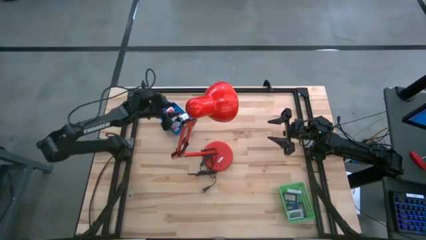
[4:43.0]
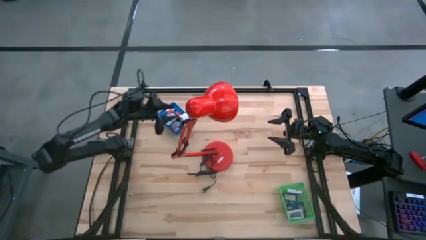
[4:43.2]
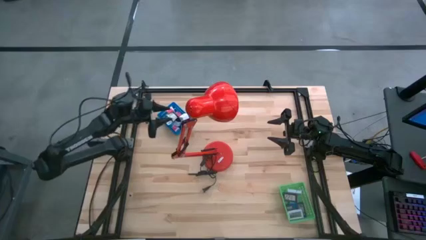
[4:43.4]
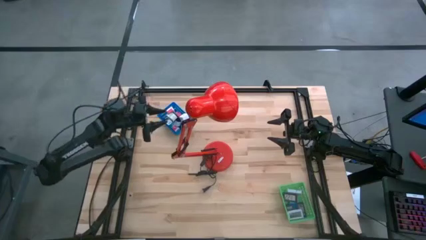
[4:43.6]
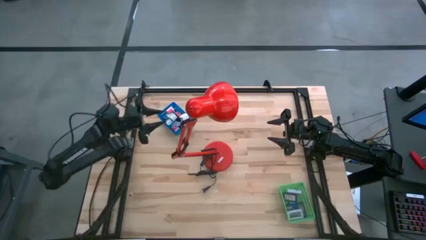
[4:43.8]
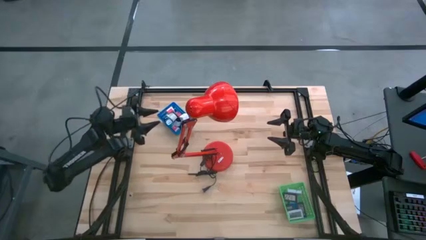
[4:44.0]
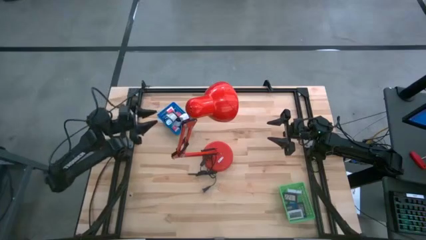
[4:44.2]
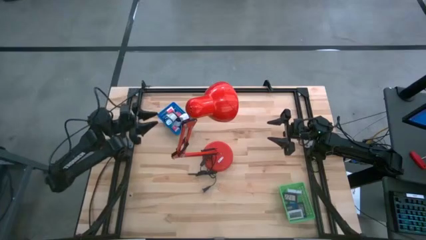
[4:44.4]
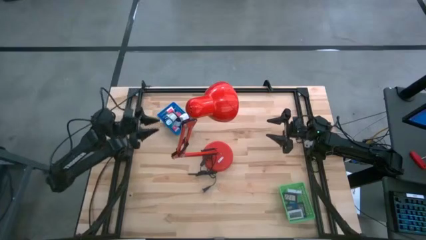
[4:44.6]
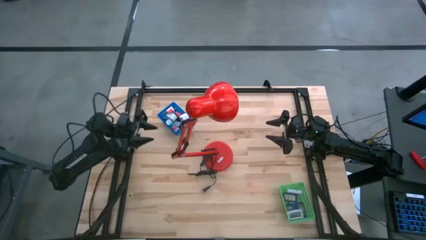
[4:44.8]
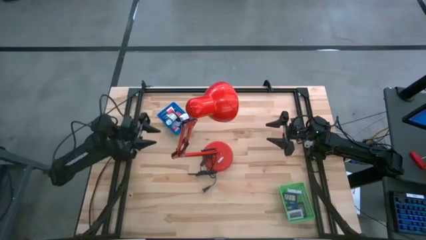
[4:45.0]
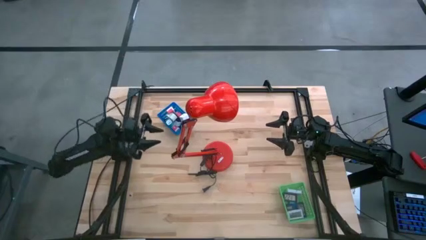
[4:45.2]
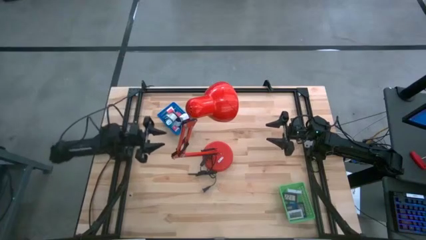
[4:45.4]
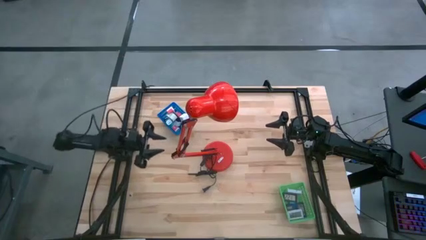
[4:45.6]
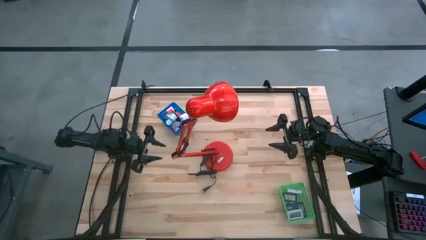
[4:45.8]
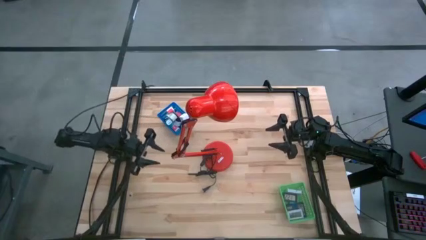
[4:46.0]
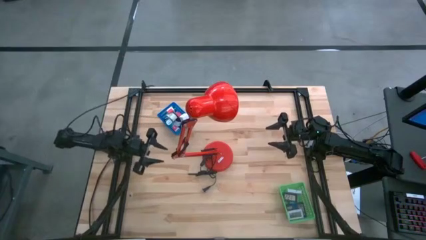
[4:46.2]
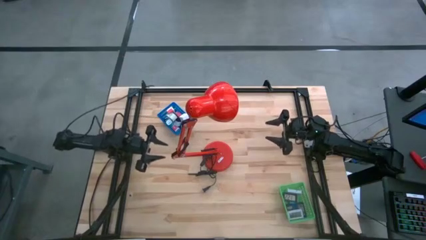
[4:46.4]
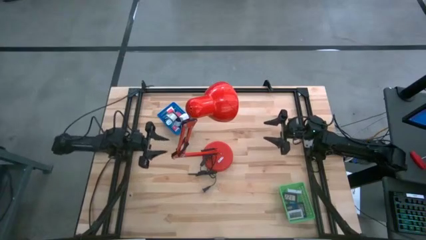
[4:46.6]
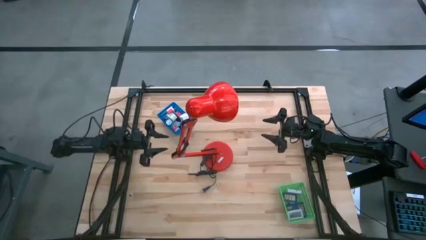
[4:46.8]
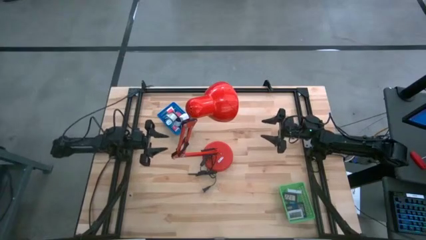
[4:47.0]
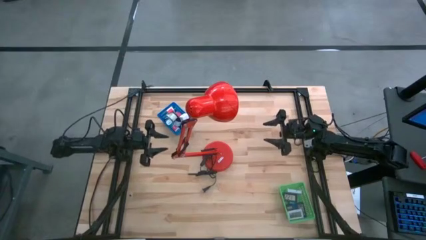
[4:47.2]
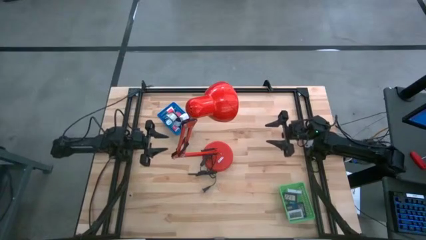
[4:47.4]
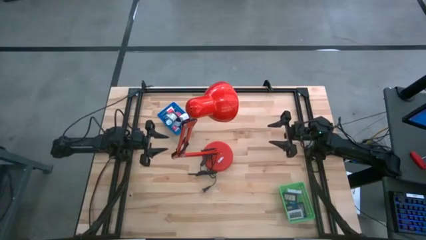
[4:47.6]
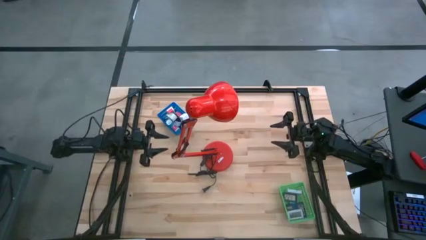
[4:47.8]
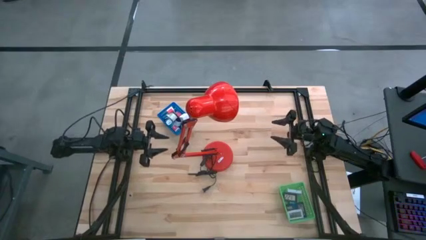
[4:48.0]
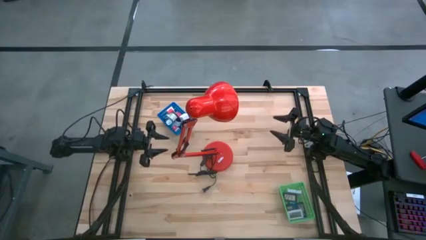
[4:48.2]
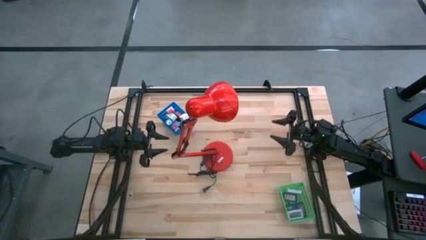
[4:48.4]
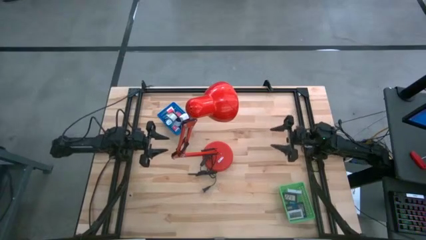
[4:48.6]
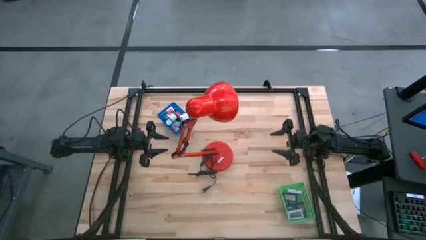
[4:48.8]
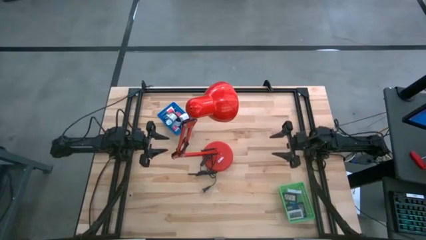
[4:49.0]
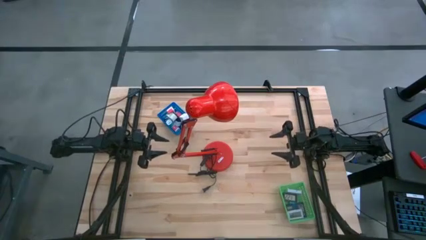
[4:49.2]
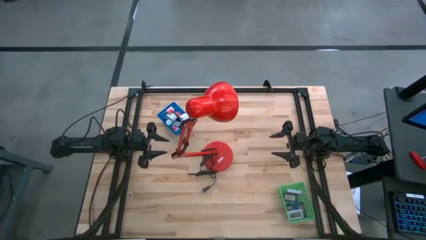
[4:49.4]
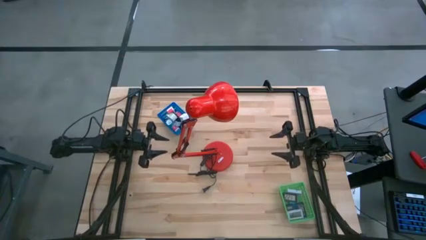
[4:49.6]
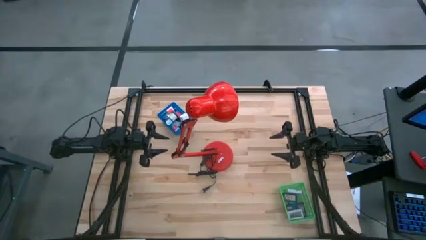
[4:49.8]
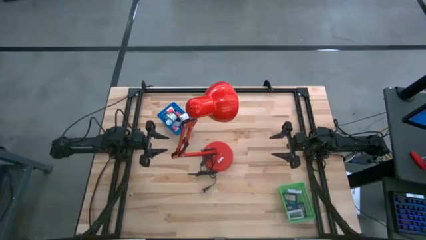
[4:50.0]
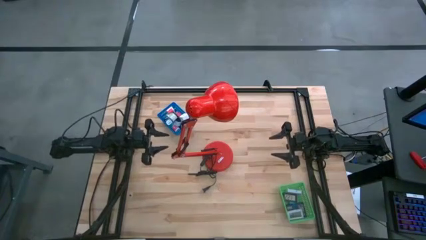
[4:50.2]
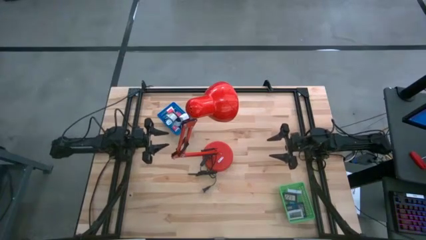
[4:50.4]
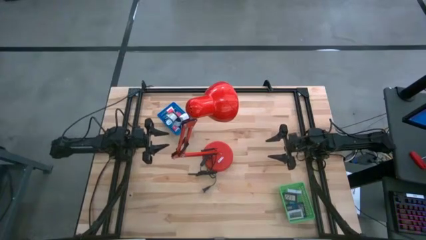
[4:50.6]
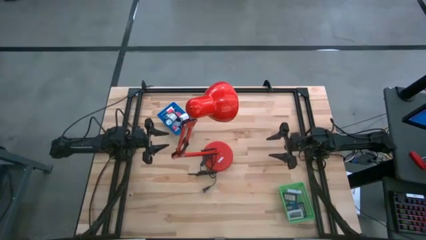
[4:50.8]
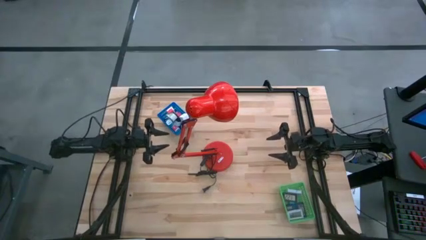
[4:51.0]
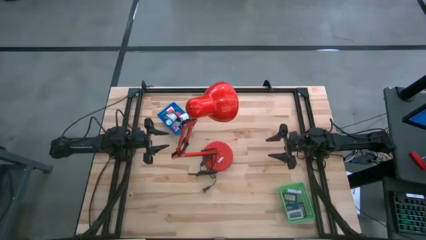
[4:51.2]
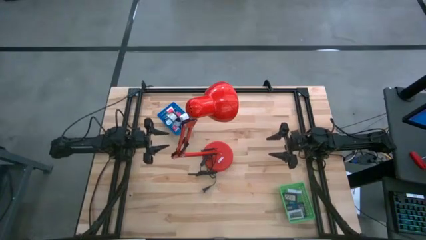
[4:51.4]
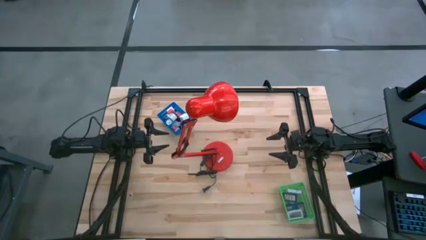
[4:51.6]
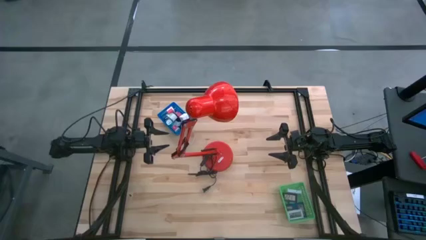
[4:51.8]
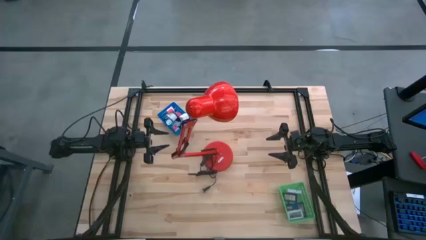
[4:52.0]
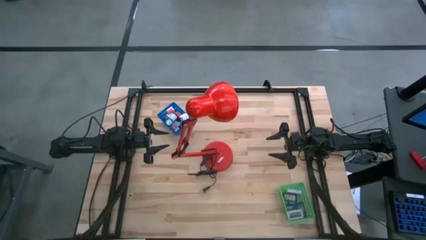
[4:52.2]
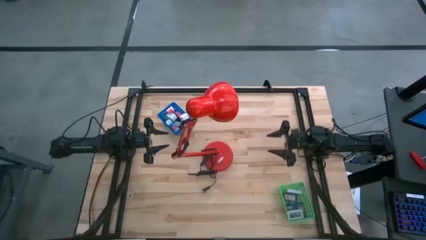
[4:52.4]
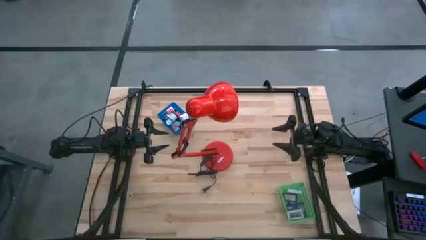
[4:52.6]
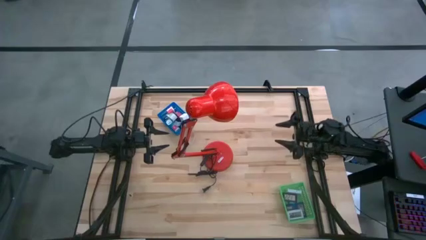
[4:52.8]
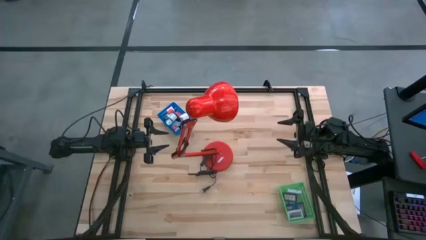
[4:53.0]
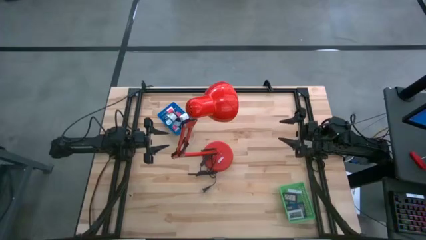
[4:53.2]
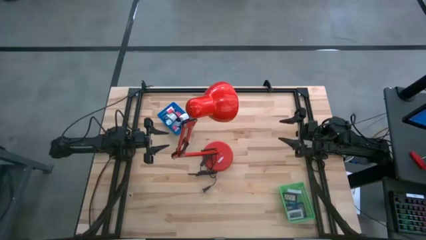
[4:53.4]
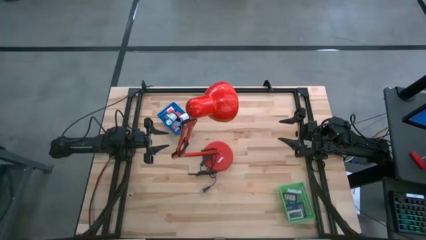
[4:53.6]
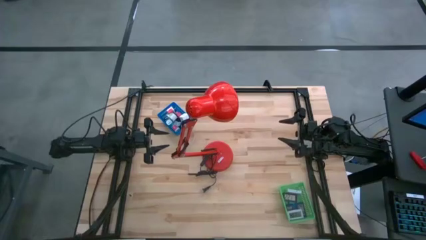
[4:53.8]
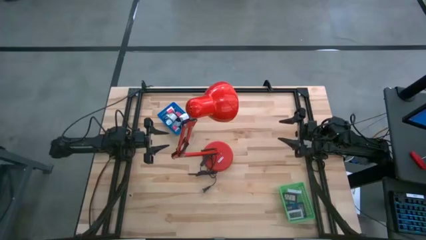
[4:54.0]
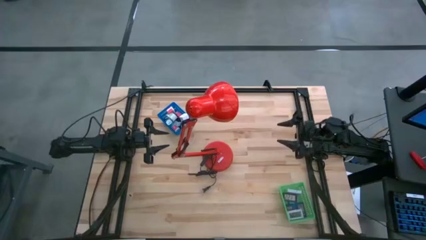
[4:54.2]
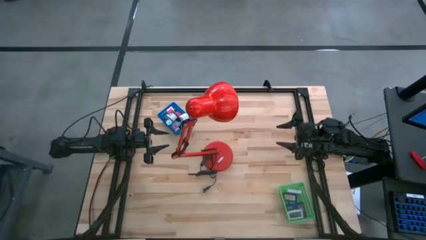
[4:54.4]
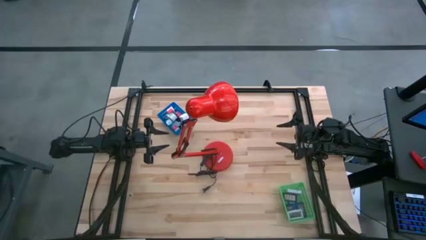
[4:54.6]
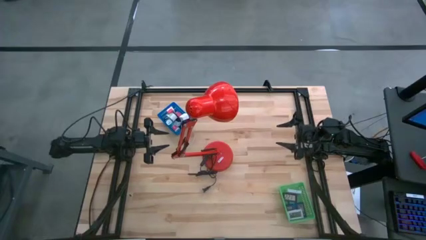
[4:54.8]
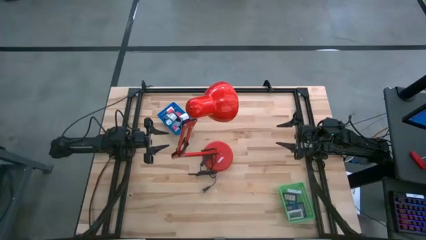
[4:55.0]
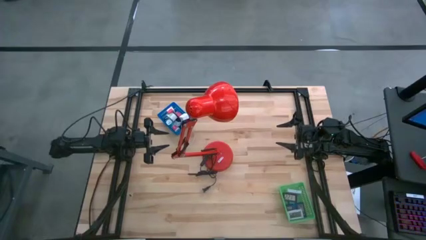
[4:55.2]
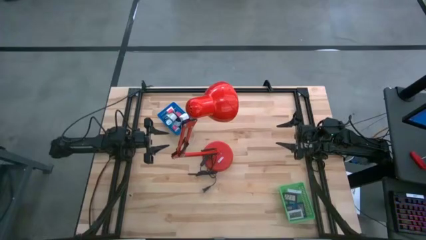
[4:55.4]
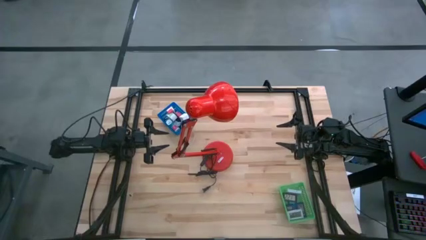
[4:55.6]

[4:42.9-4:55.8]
Task: Pick & Place Office items
Return to Home Position
